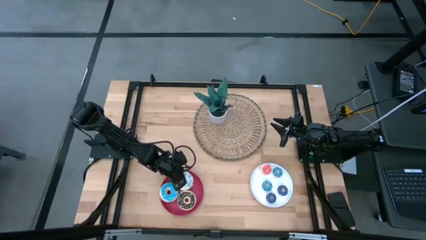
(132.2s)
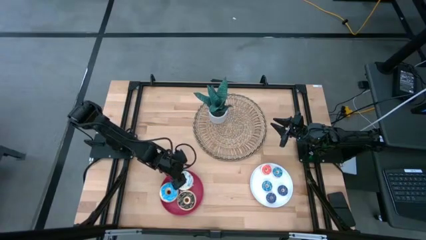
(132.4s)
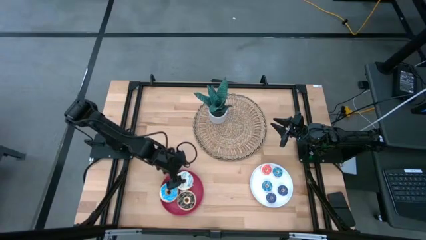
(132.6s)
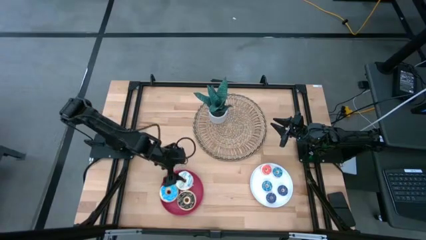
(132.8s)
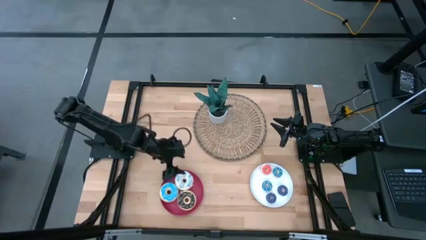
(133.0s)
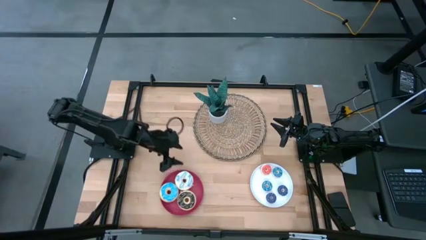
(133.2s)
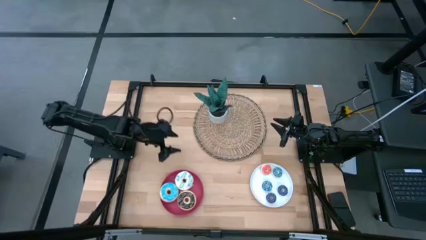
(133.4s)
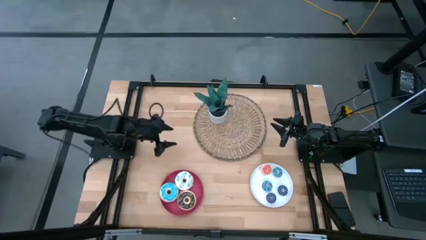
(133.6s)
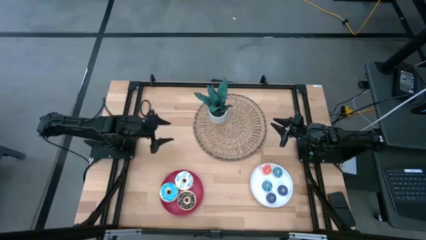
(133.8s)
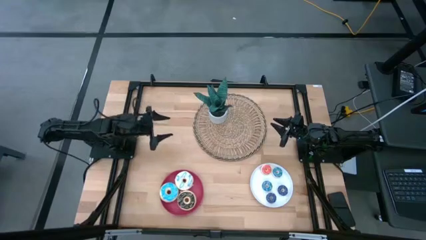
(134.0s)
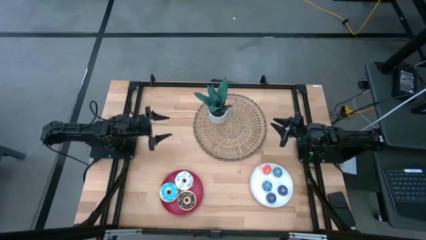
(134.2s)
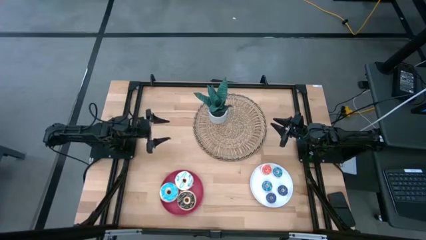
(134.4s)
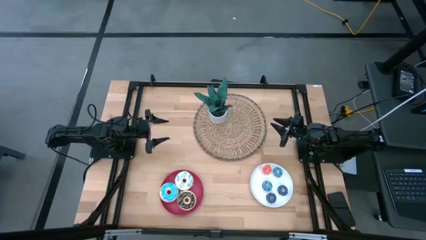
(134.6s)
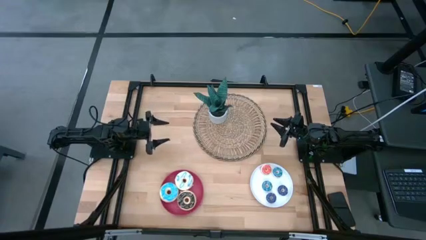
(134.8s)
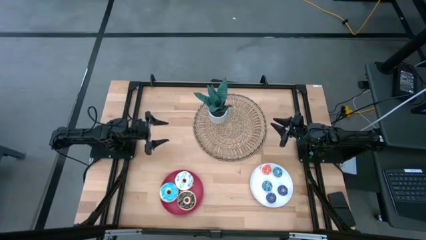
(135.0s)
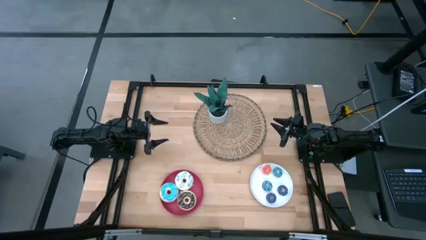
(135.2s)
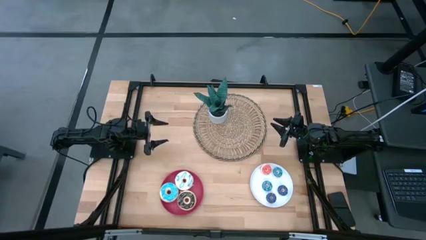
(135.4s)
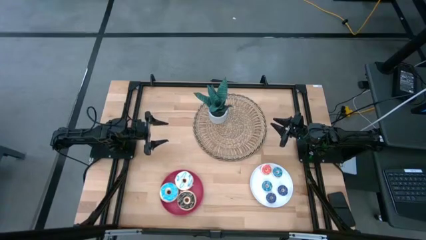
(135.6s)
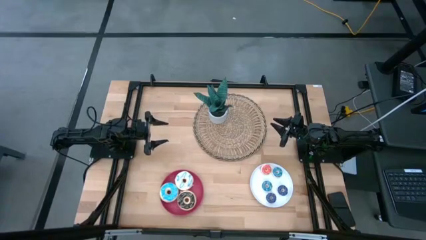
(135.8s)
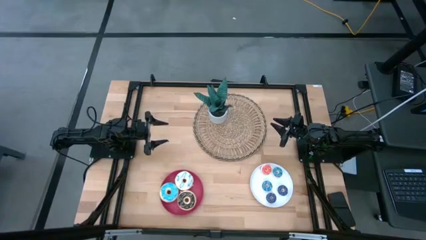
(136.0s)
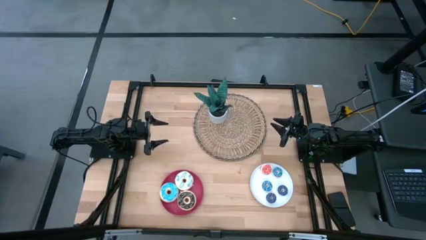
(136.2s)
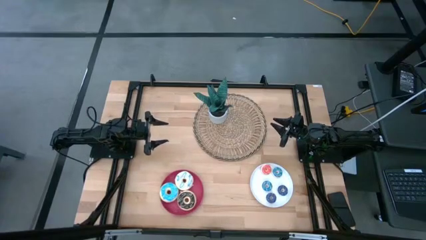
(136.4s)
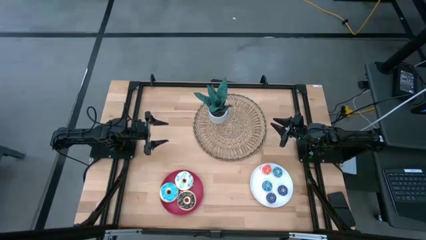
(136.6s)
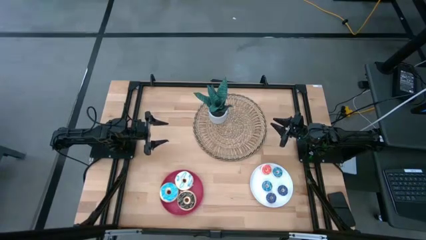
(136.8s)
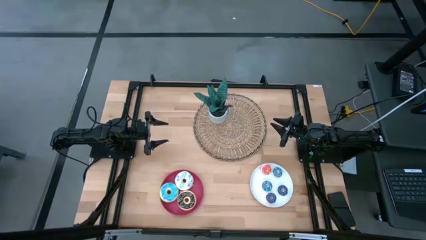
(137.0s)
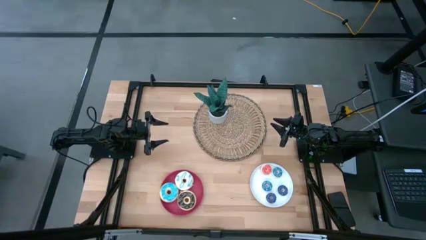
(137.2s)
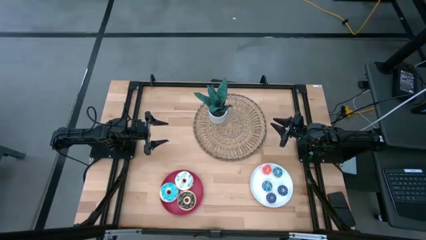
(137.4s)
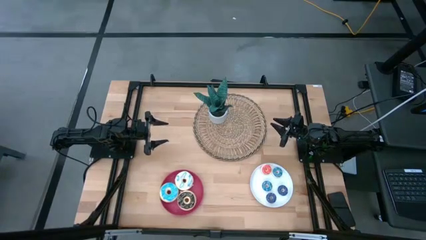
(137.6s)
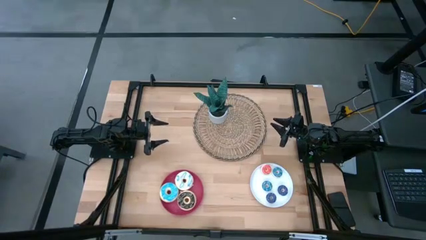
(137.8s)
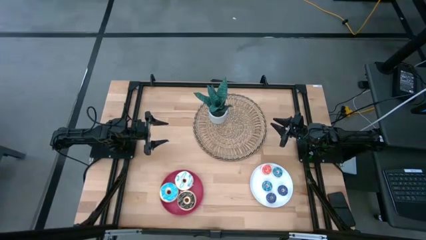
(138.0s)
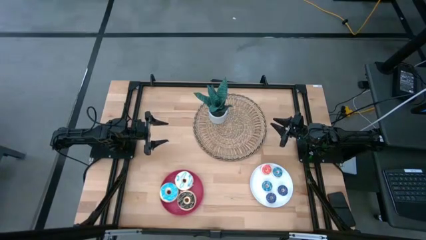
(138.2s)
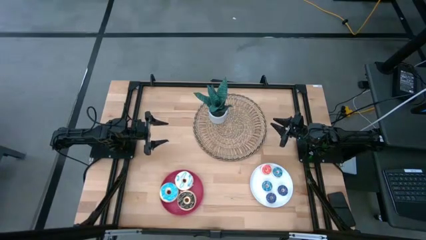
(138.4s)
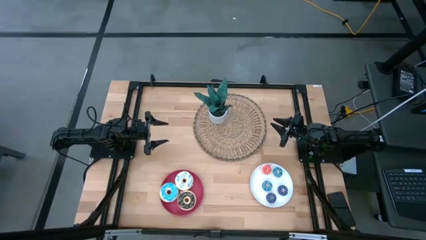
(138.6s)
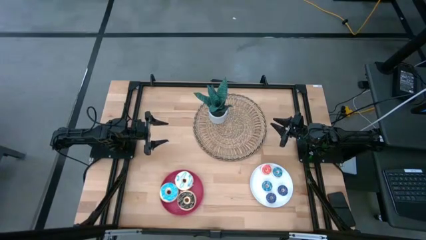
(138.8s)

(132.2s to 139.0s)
Task: Pick & Place donuts
Return to Home Position
